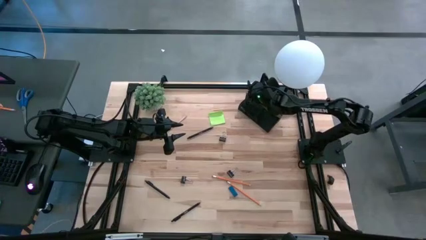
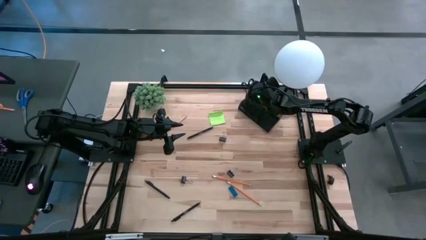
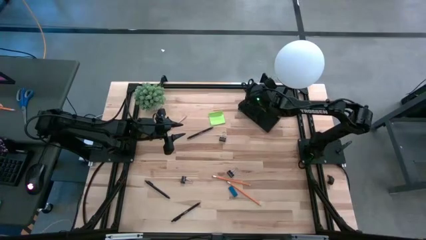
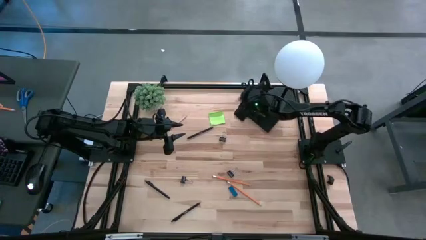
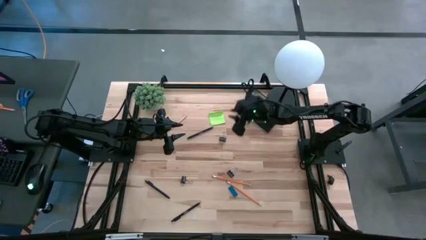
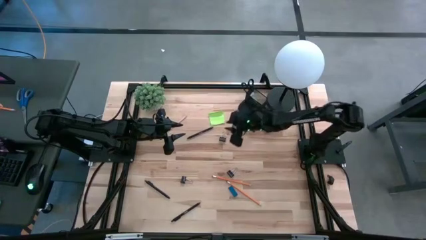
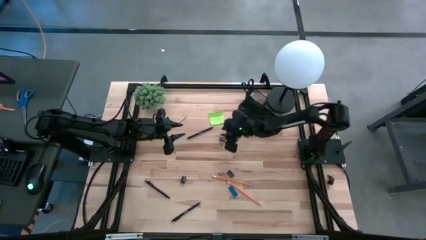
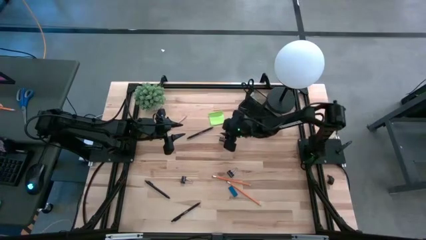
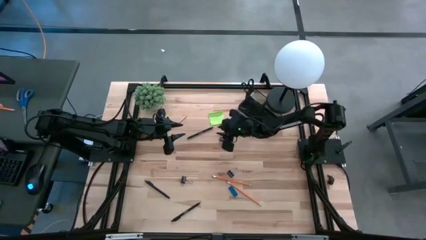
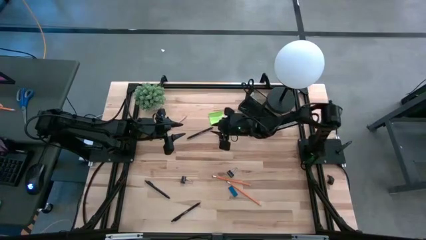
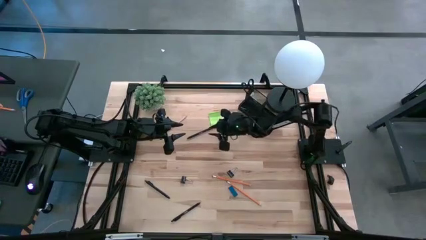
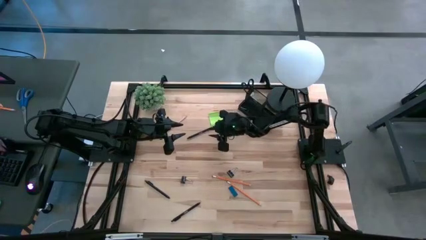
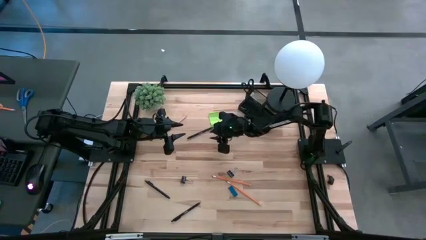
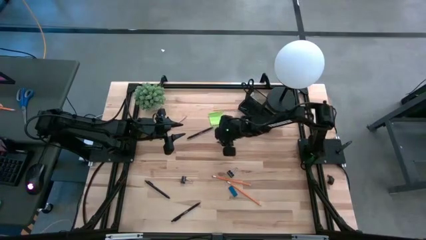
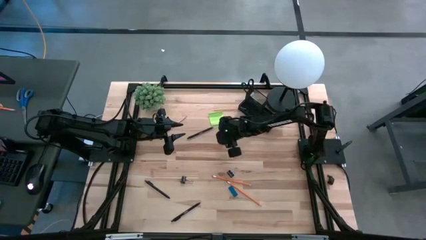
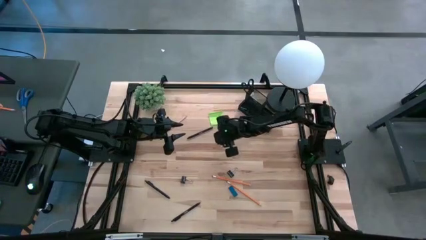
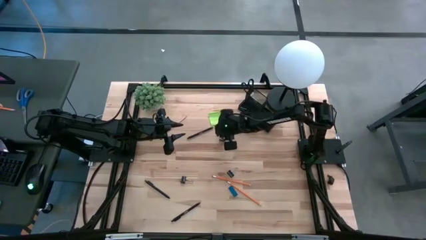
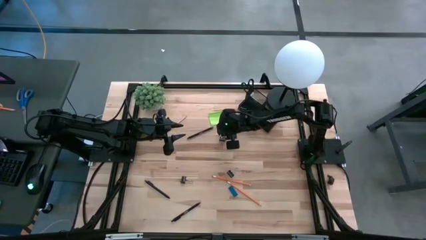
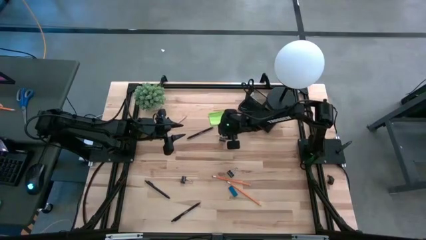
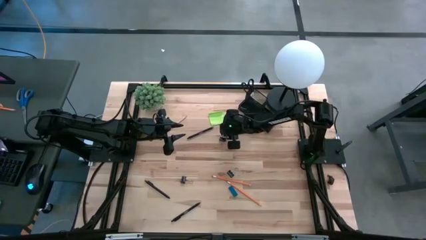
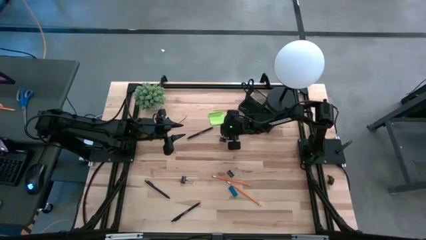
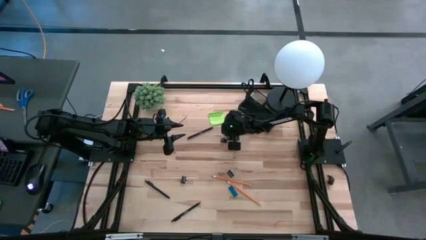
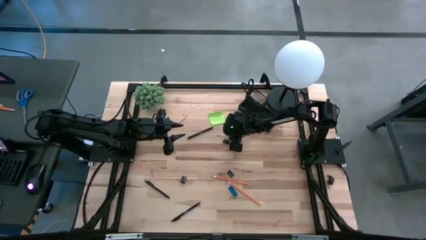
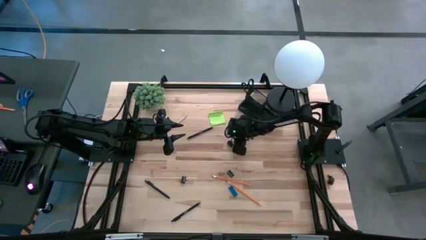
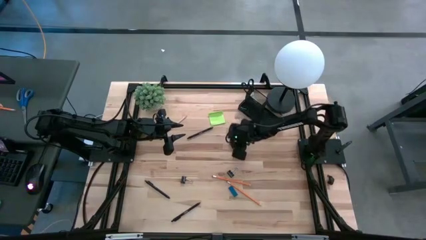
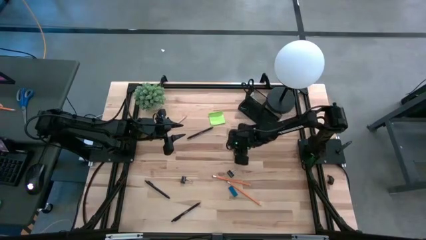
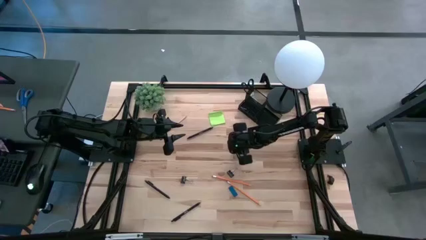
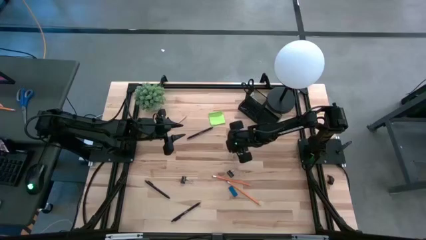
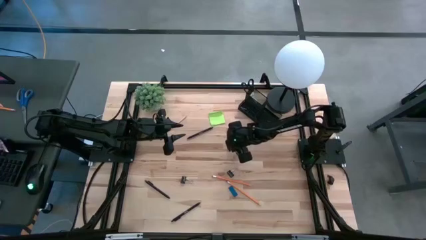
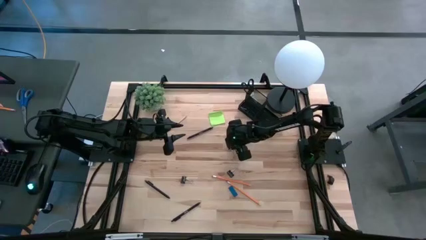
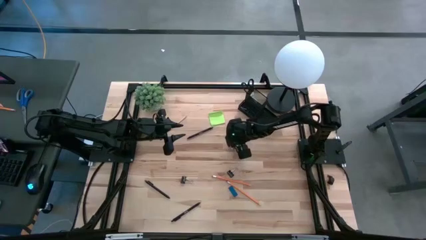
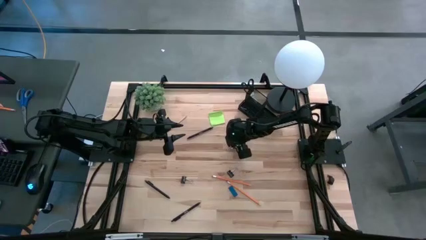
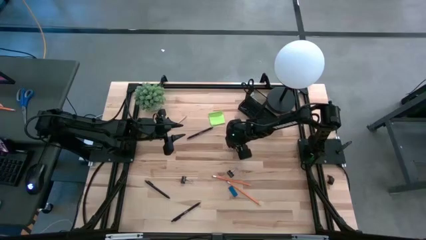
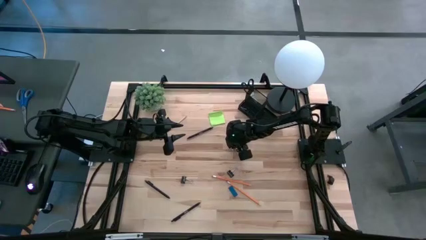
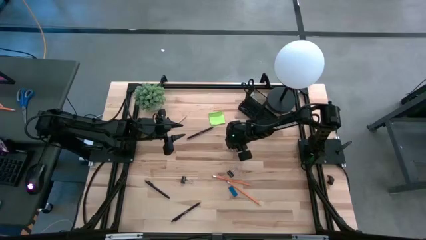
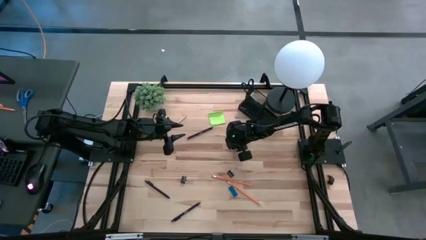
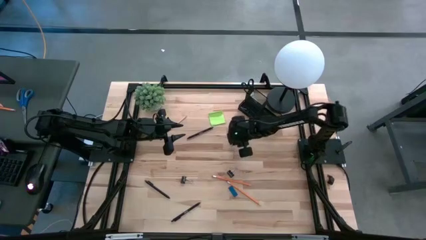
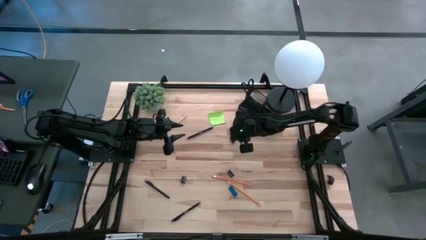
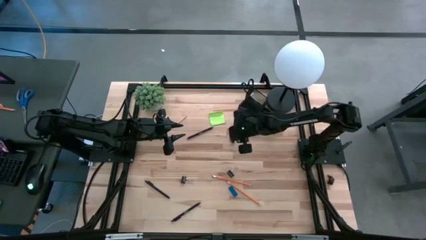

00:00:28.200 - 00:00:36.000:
Task: Pick and place office supplies into organizer
Put the black binder clip into the black desk organizer

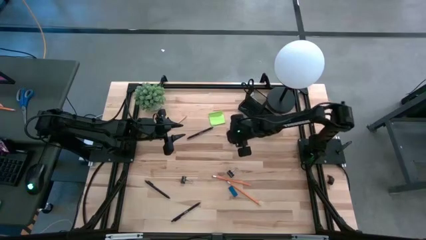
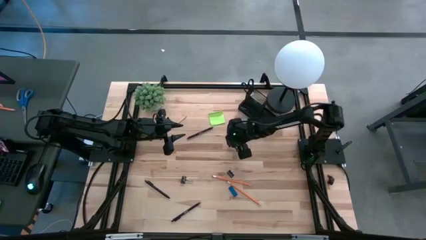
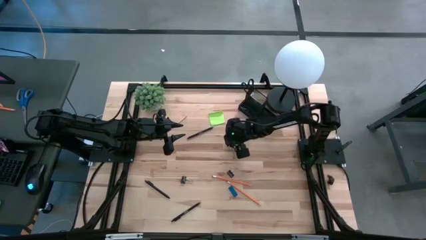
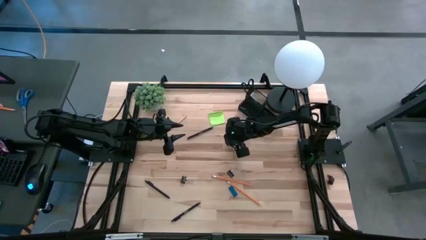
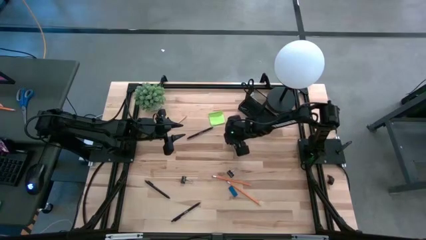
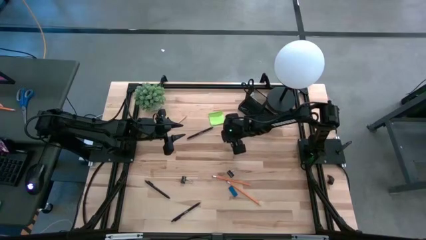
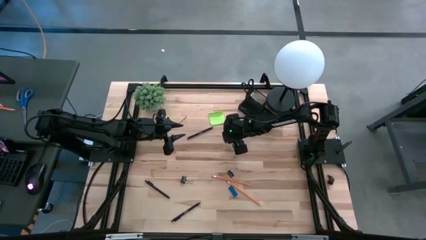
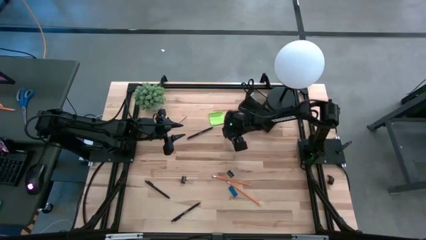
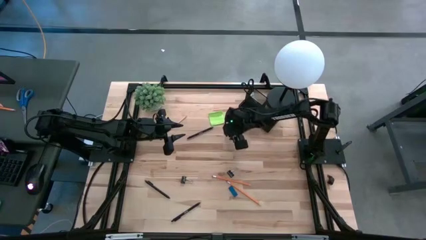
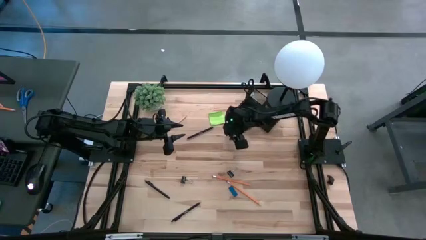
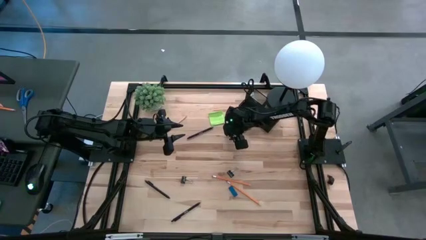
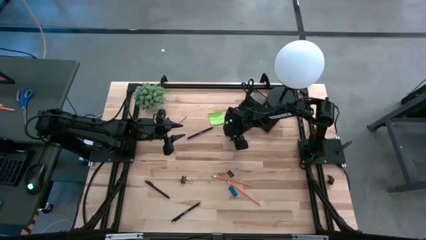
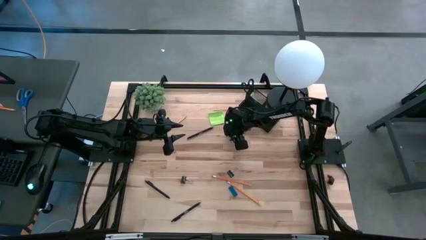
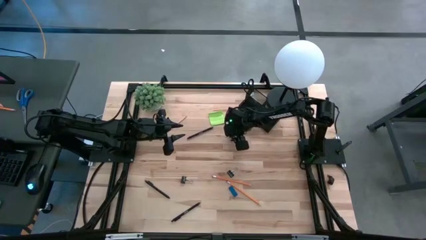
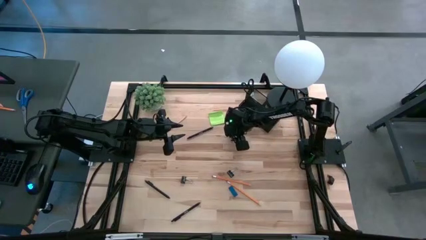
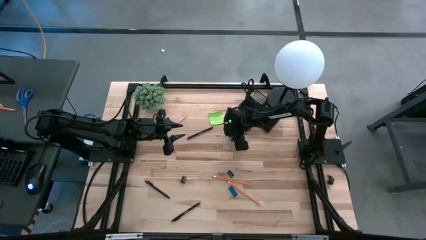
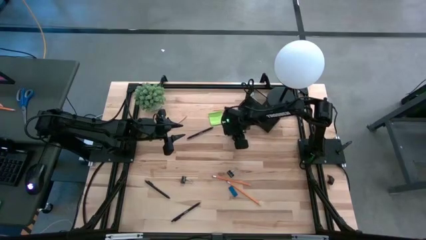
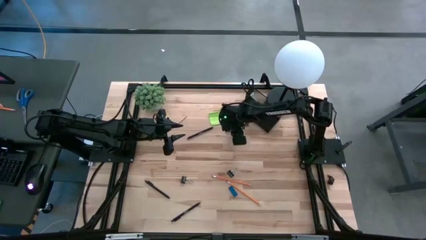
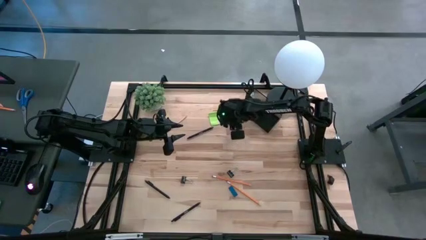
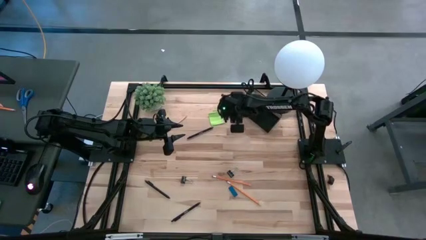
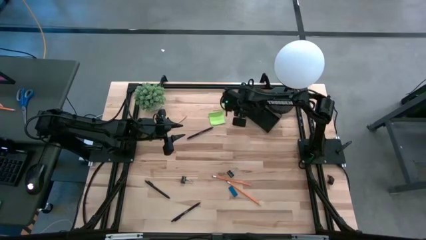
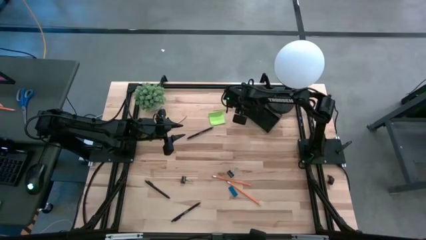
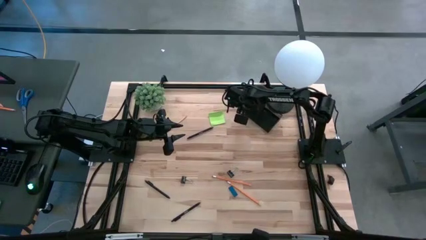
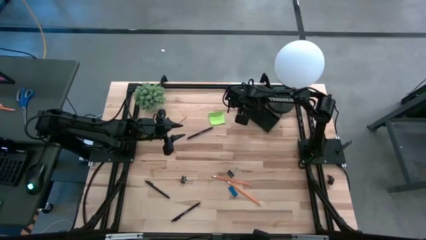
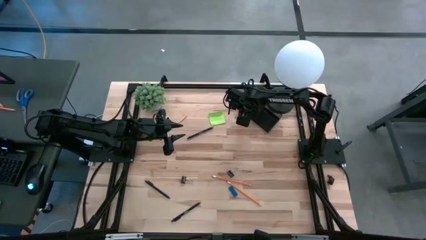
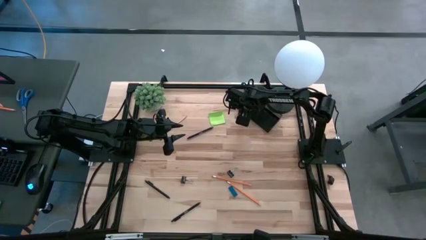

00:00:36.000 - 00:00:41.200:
Put the black binder clip into the black desk organizer

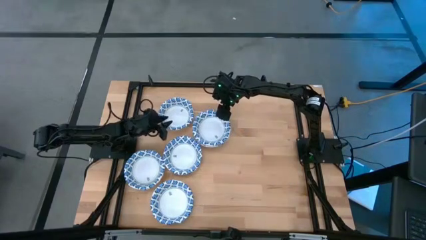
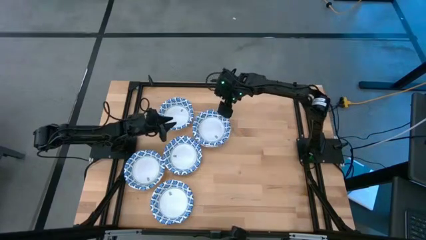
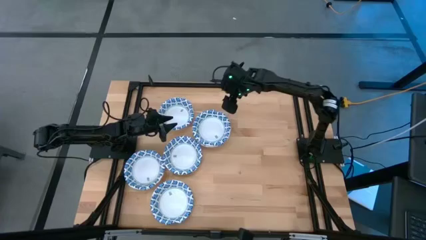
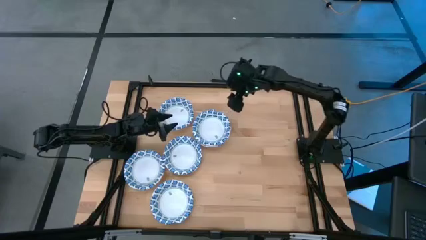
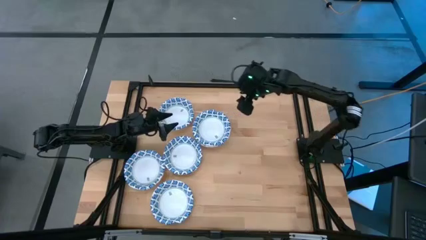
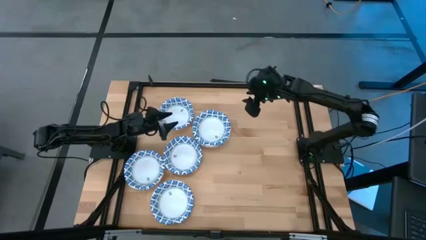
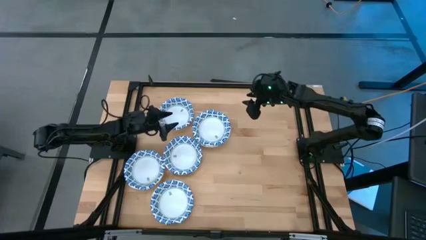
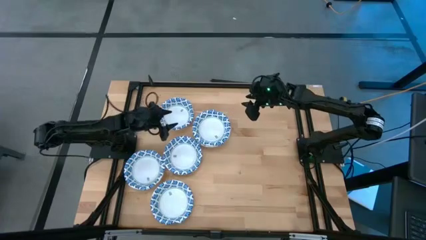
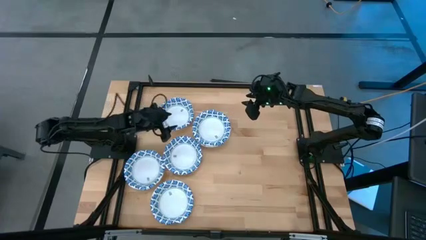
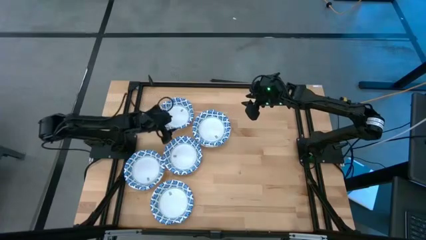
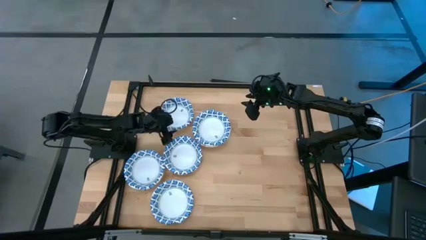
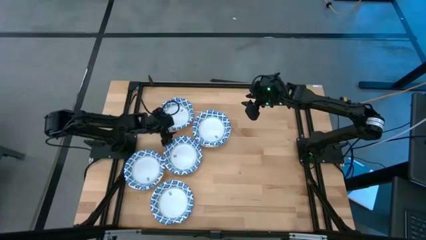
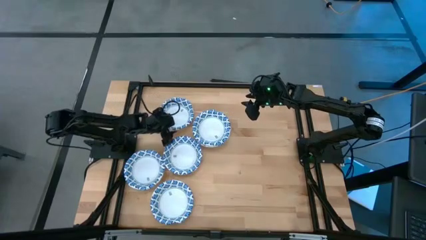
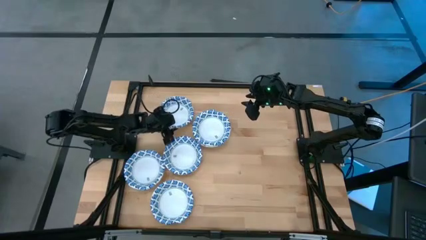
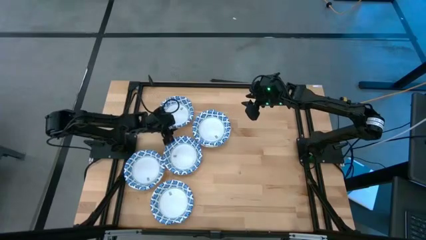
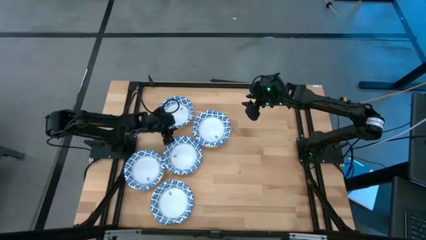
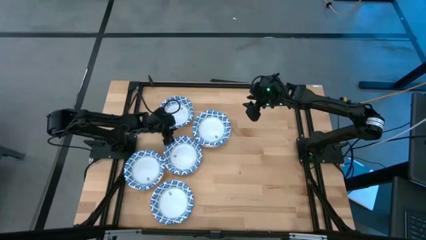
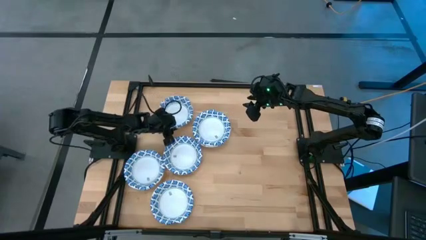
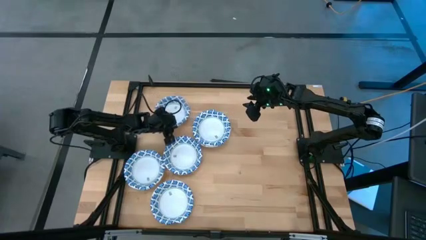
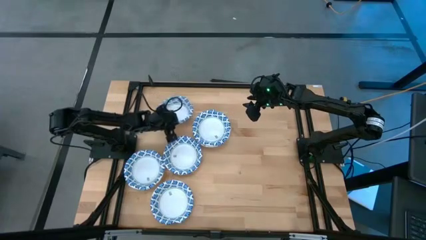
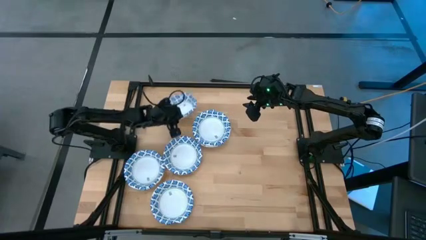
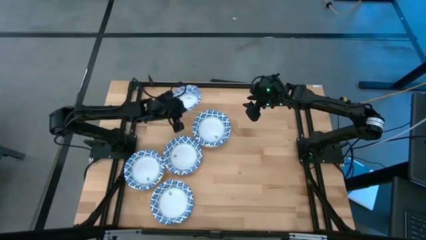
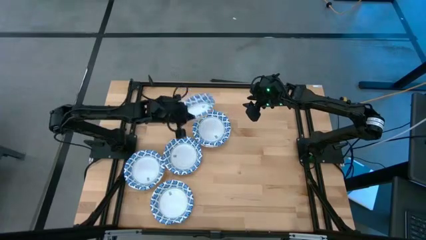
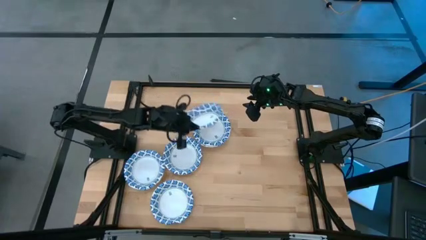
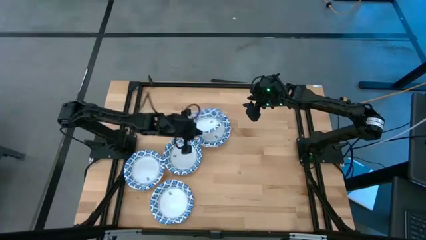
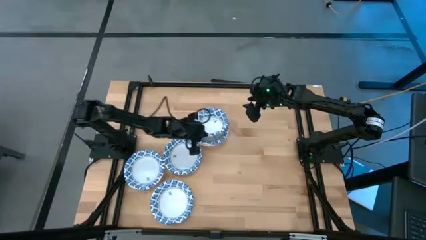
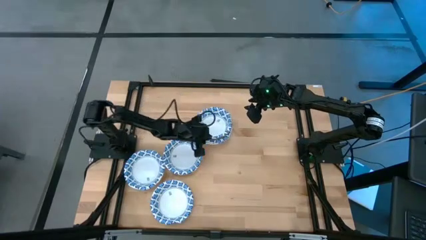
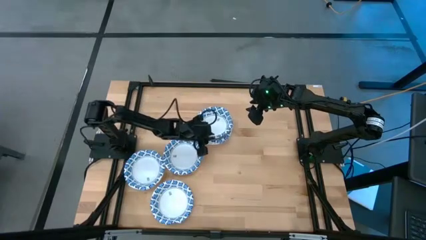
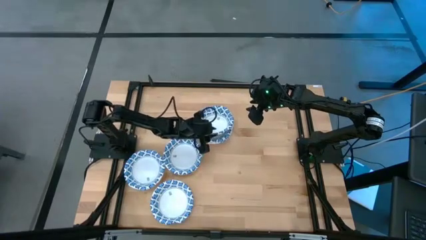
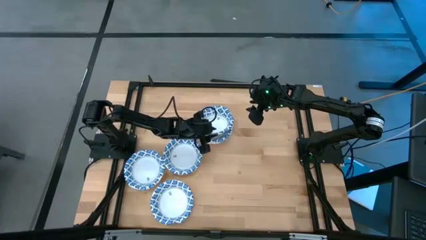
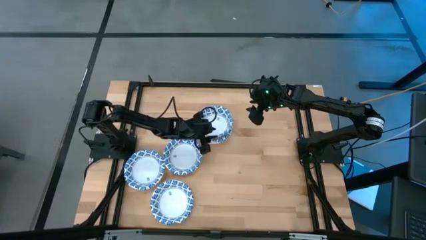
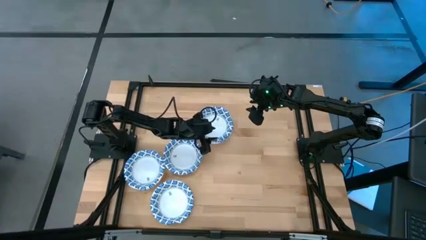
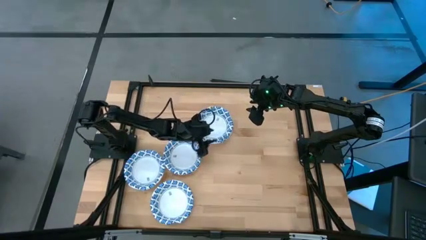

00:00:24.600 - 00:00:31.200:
Task: Nest bowls inside each other
Stack the white and blue bowl on the white and blue bowl on the table
